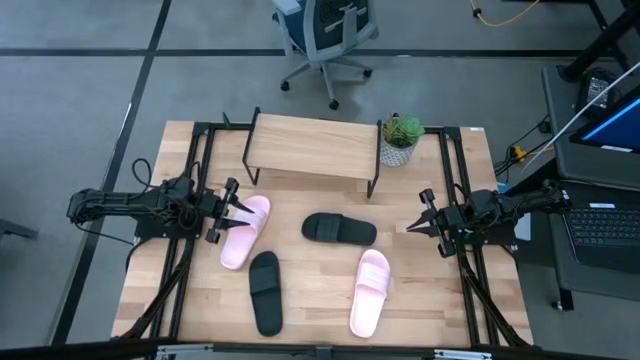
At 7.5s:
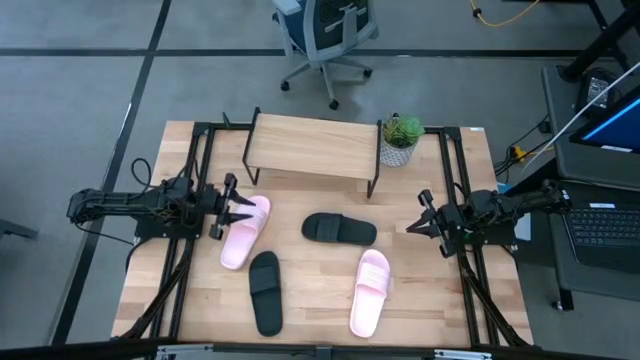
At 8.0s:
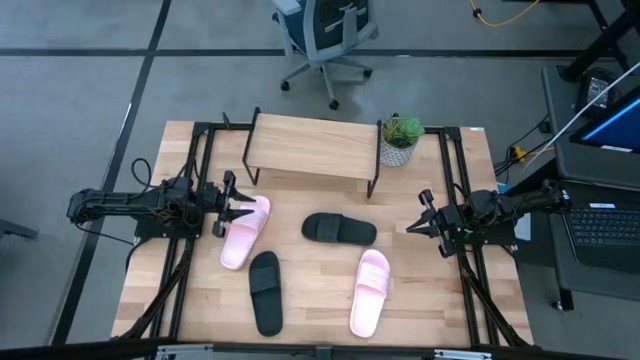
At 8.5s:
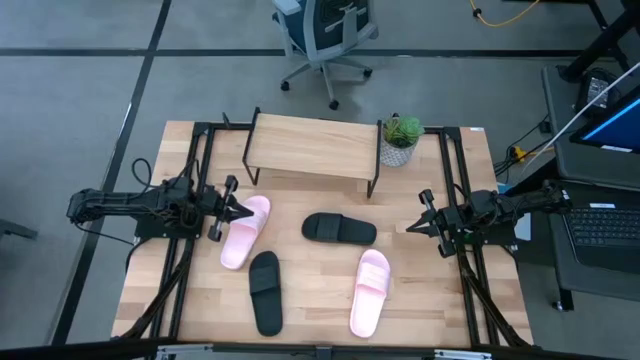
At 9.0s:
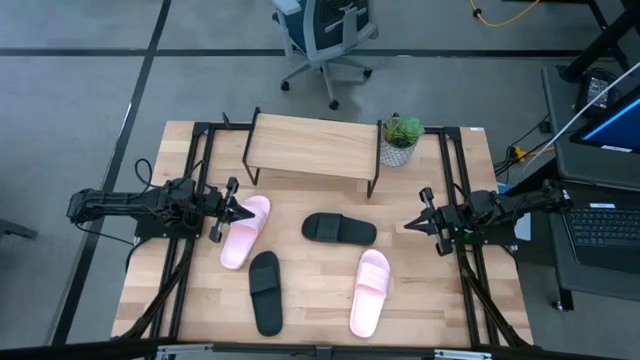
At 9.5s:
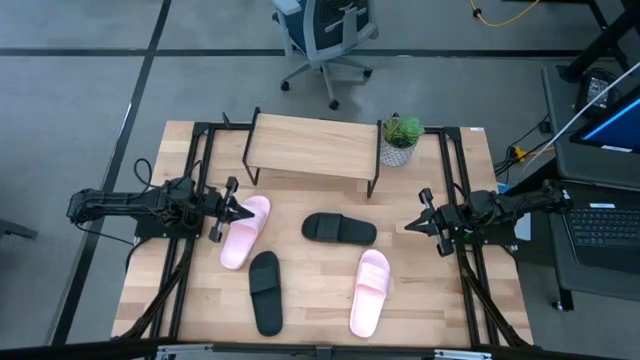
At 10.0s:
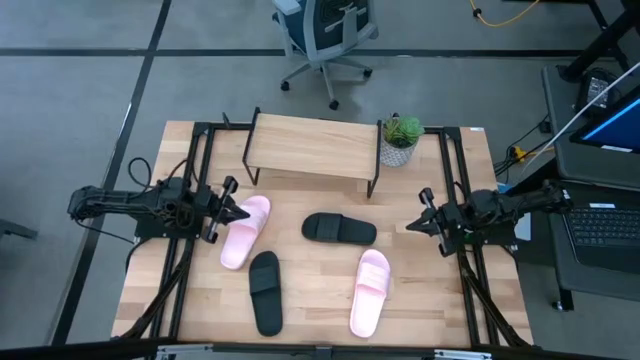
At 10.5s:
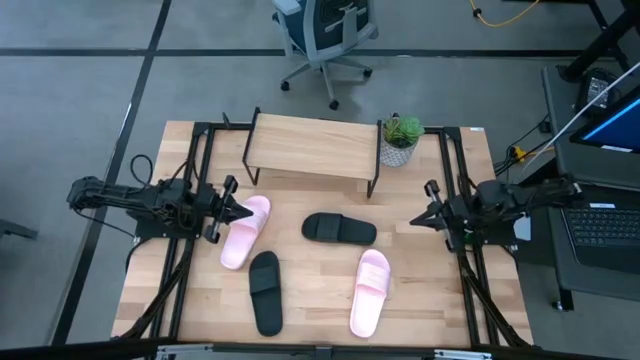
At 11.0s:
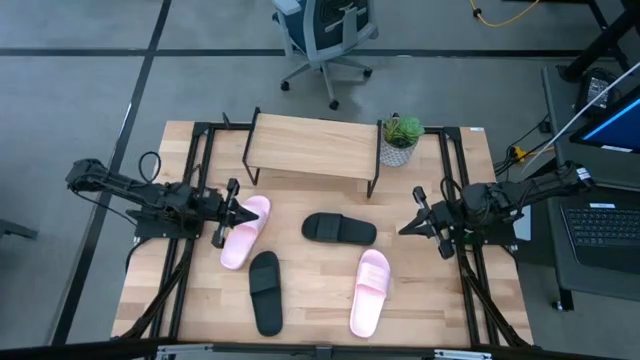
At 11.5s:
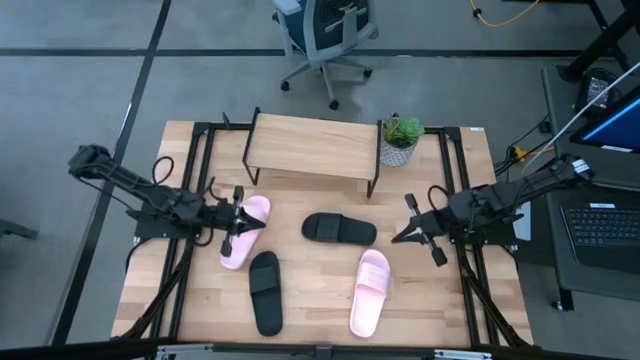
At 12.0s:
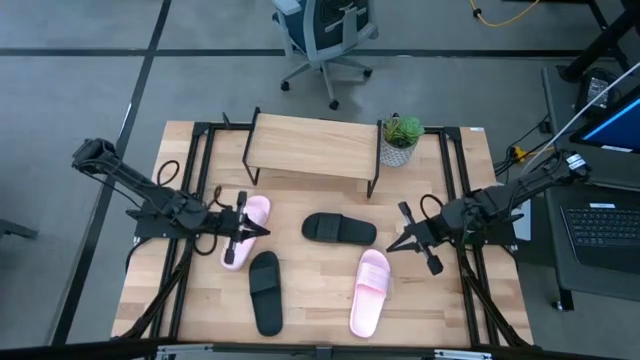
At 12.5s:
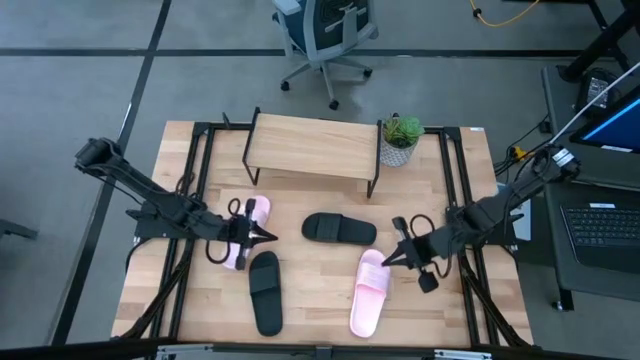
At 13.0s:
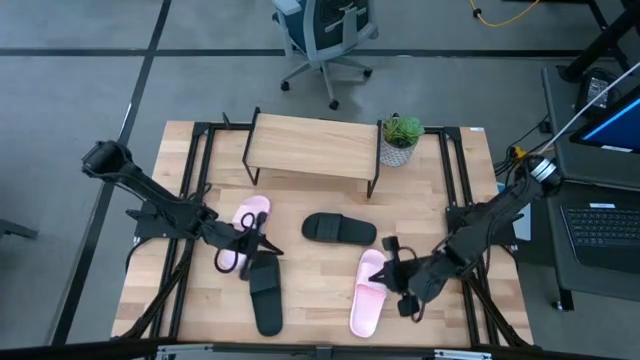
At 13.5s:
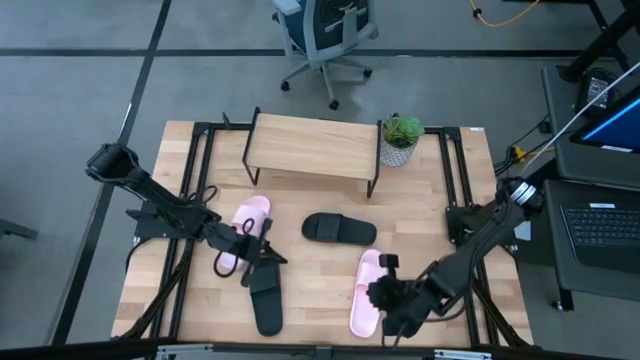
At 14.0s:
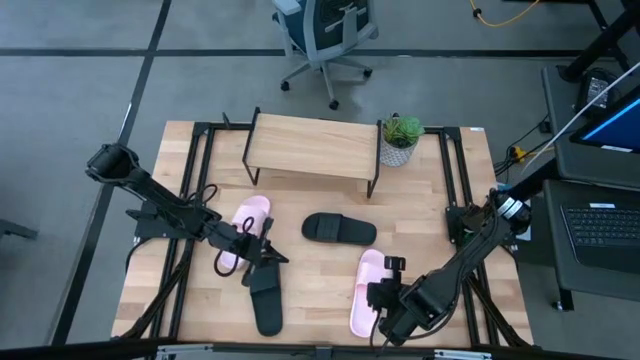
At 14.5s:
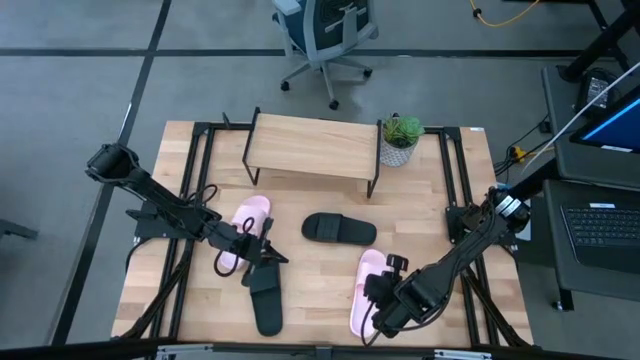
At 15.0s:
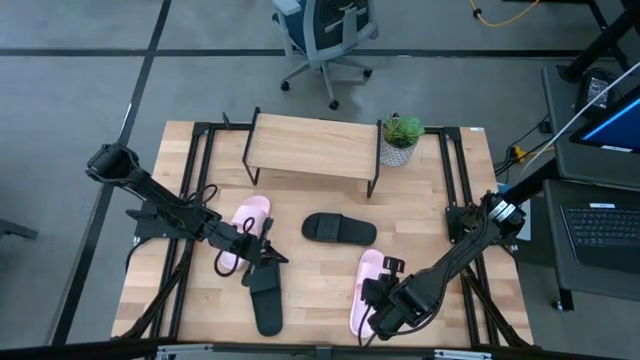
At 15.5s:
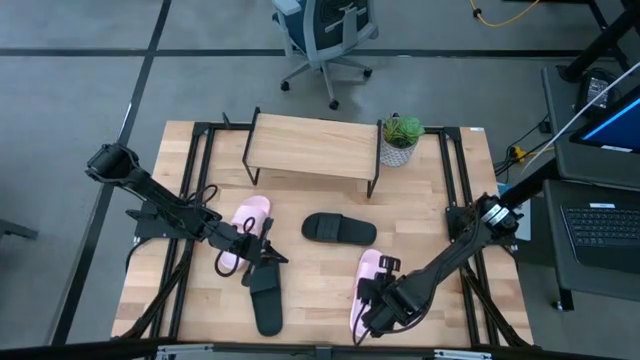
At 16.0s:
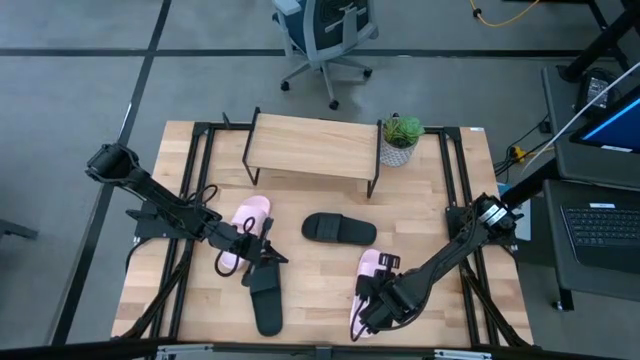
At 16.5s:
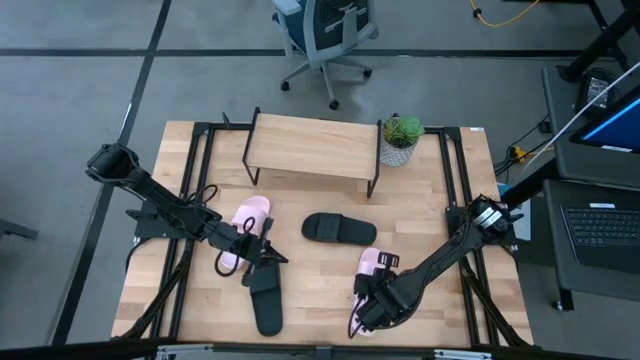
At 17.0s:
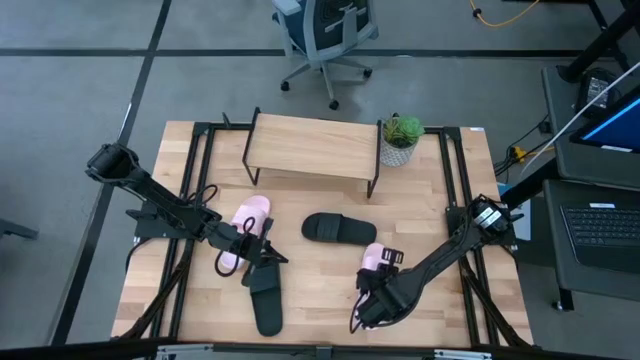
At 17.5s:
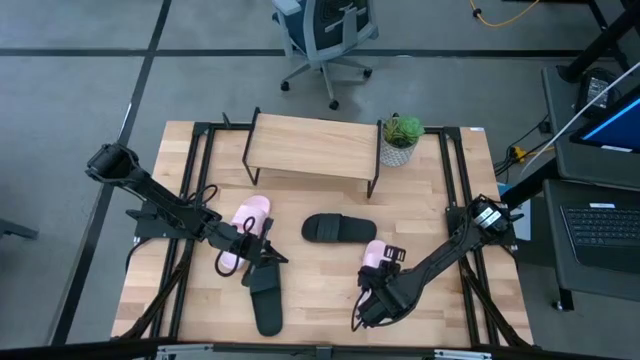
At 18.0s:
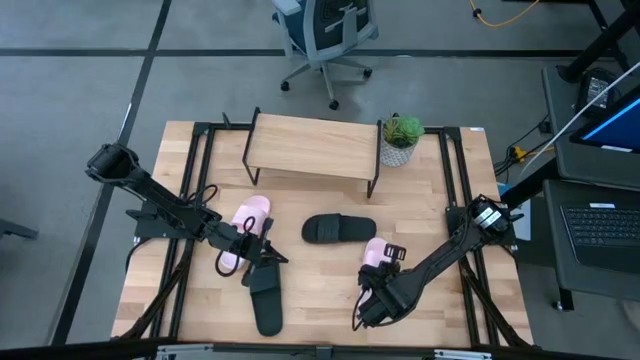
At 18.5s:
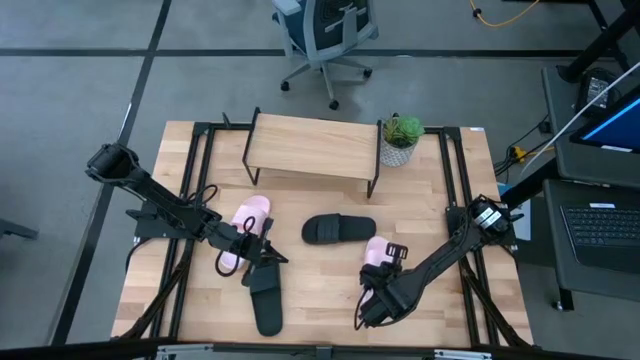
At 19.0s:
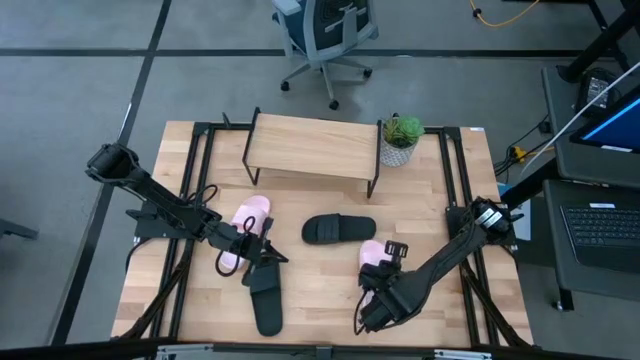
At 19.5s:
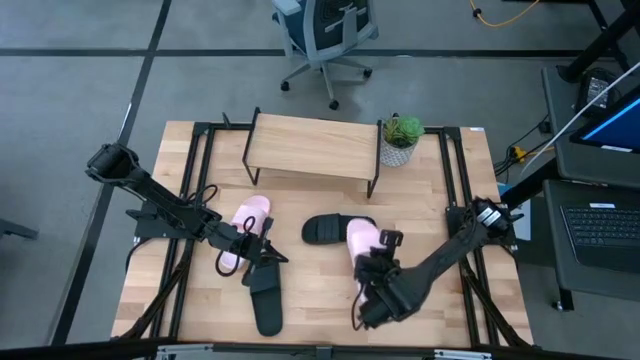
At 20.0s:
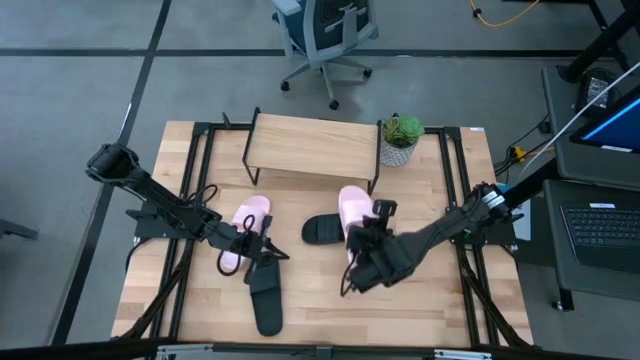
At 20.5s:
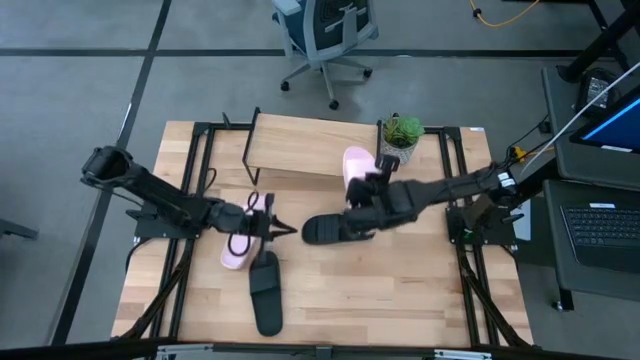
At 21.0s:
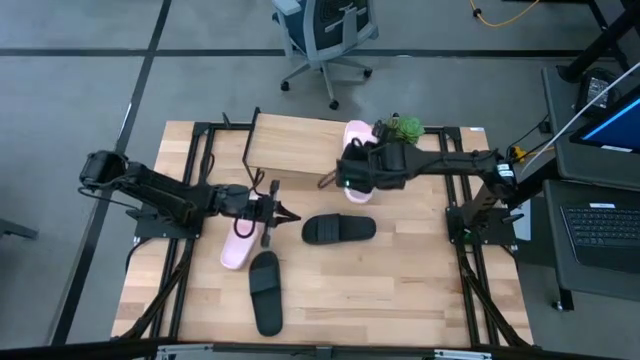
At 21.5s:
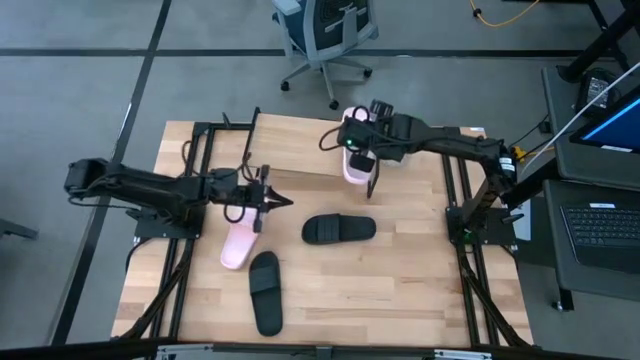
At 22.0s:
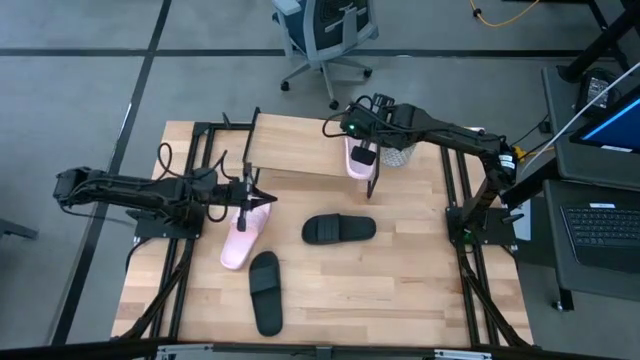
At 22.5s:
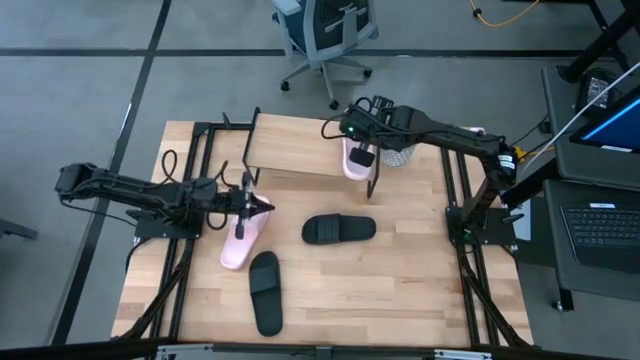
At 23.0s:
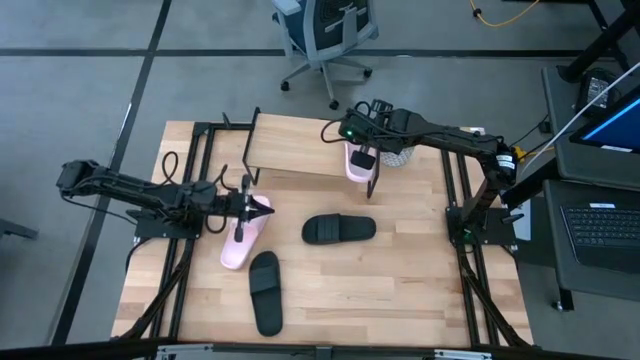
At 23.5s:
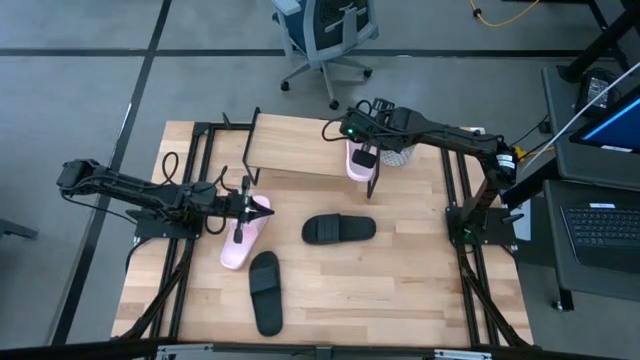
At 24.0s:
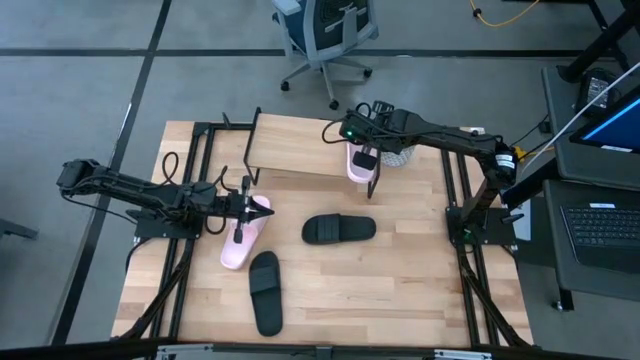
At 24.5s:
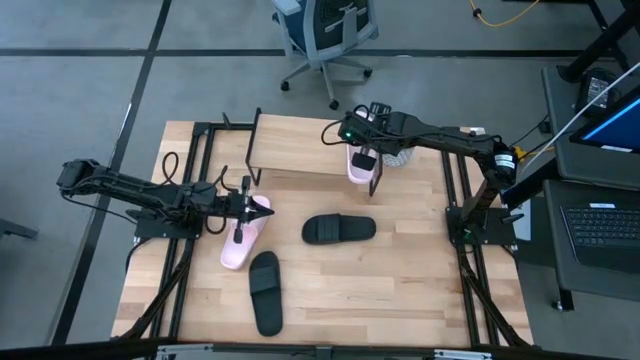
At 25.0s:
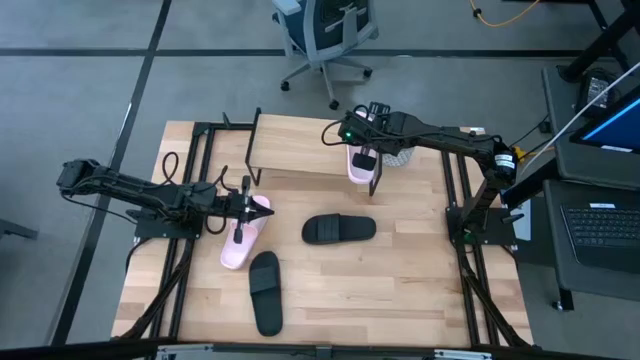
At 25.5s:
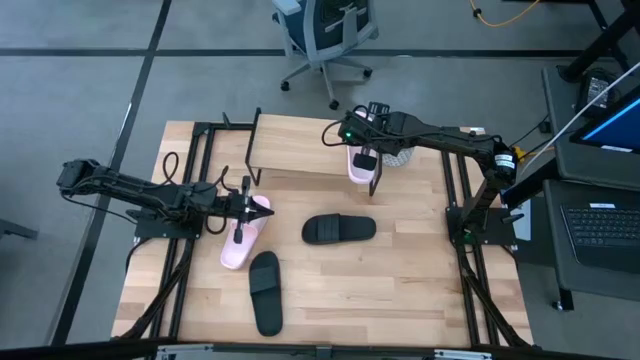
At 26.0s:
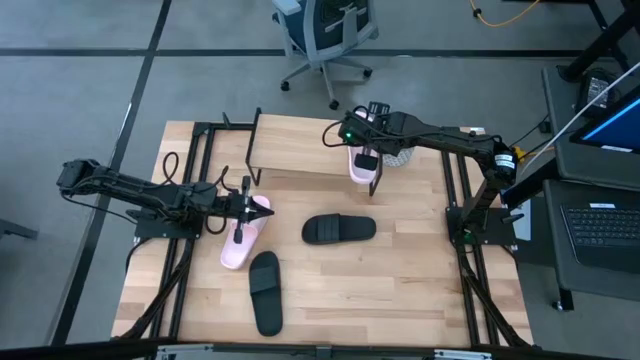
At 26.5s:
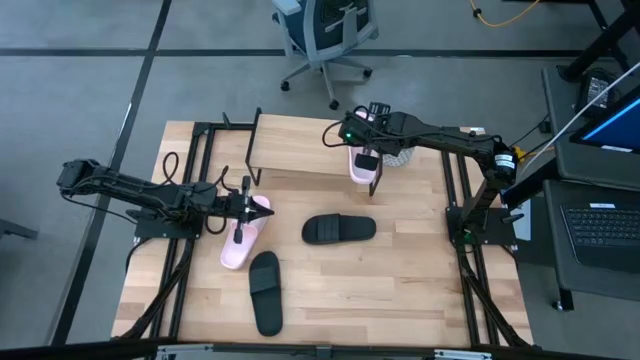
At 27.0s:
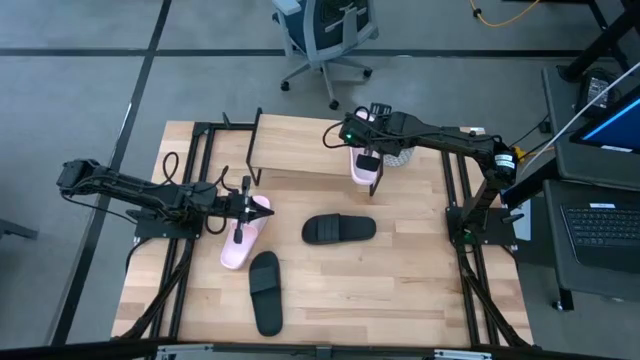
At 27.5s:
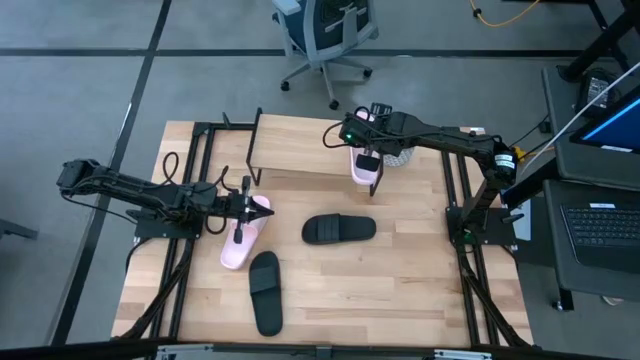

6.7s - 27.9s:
Task: Pick and place slides into the shelf
Put the right pink slides on the shelf
